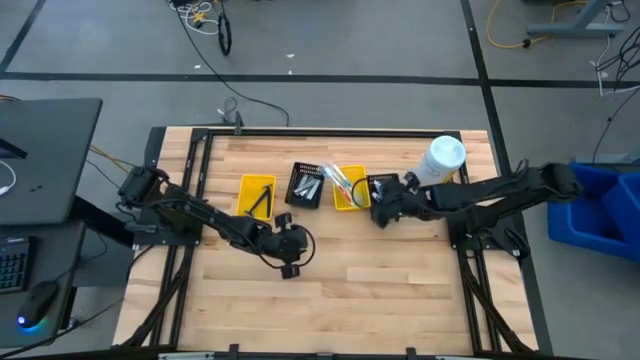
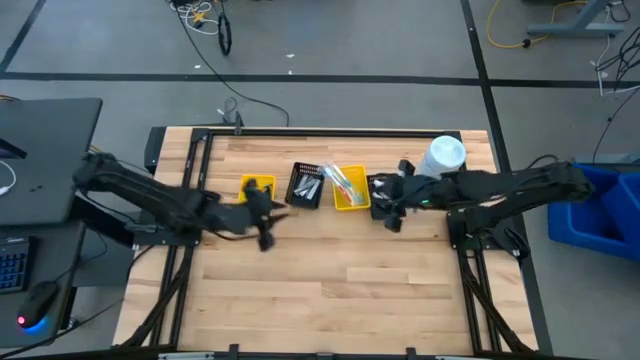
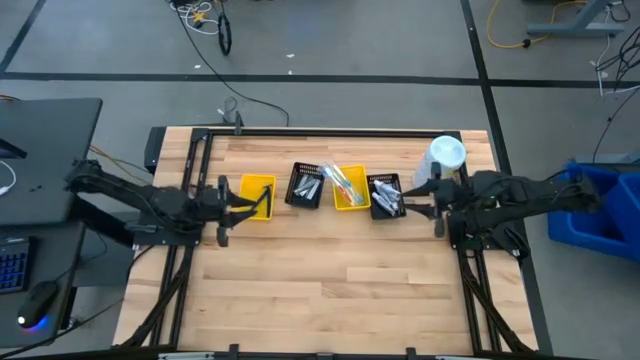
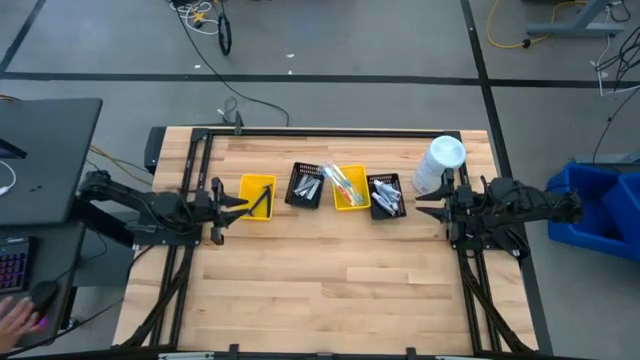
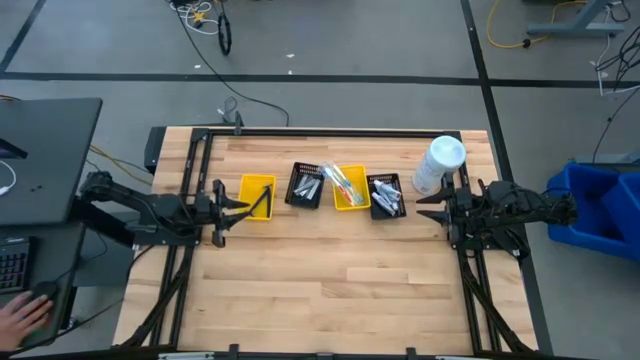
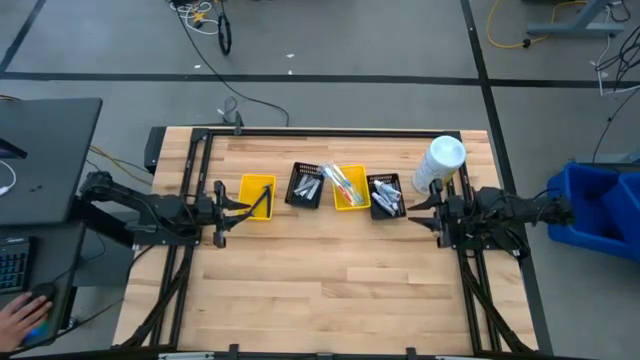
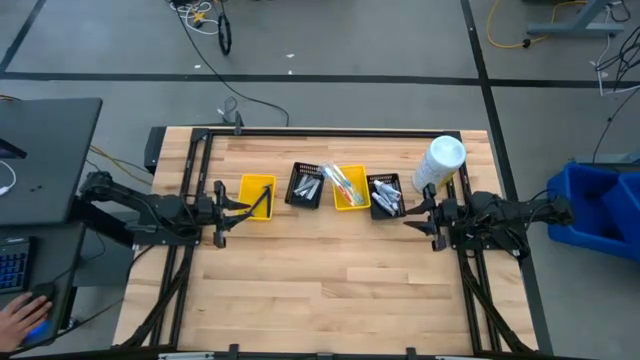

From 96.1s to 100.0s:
Task: Pick & Place Travel size toiletries
Return to Home Position

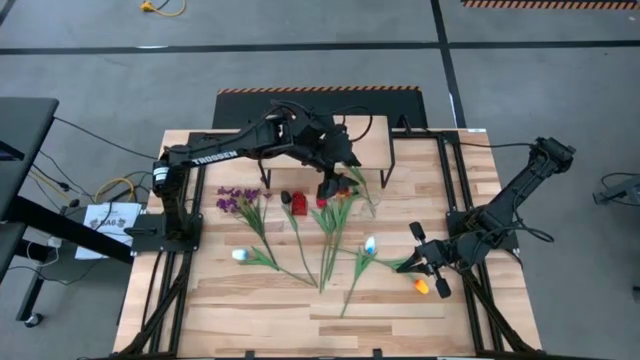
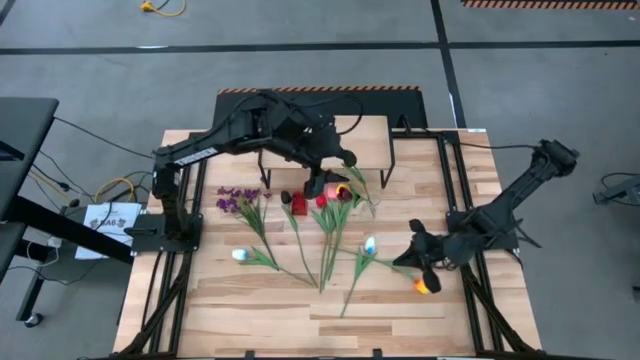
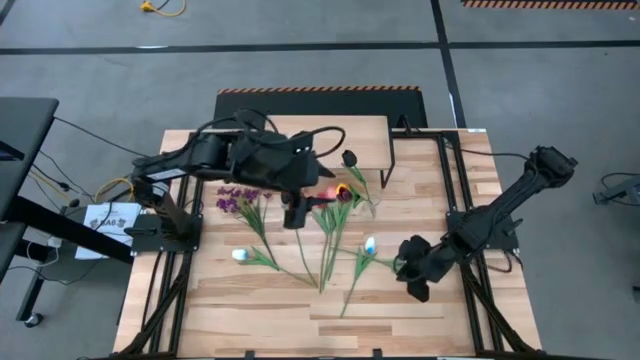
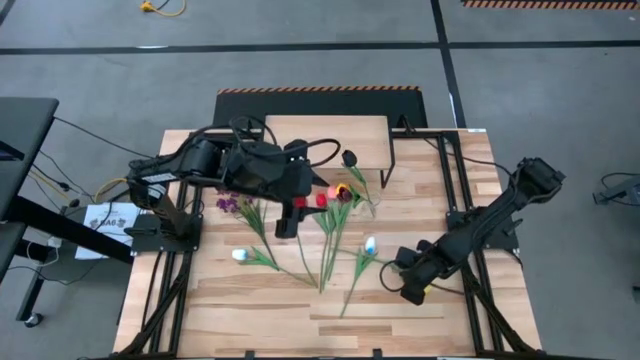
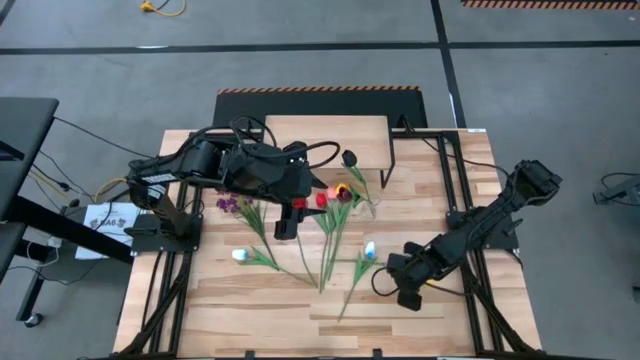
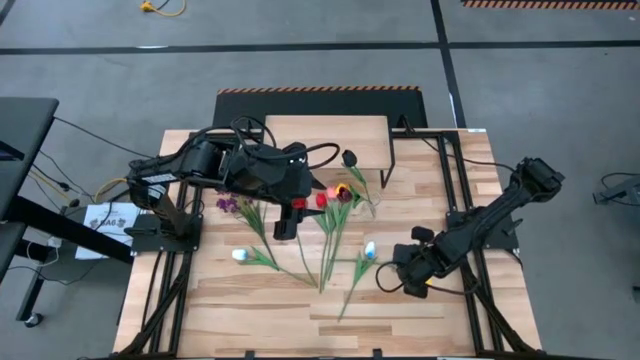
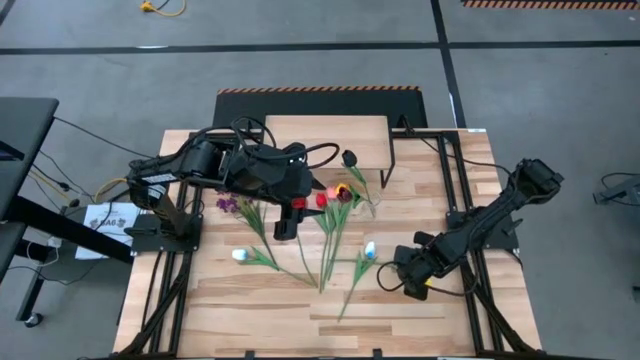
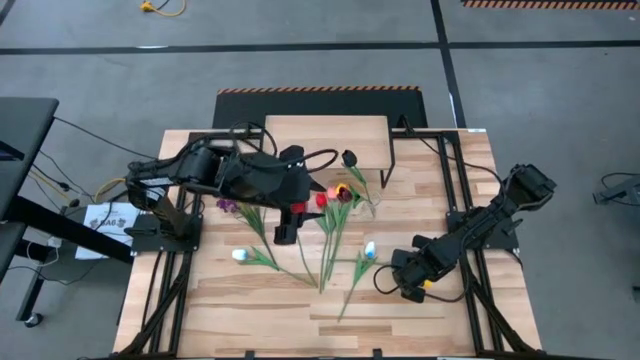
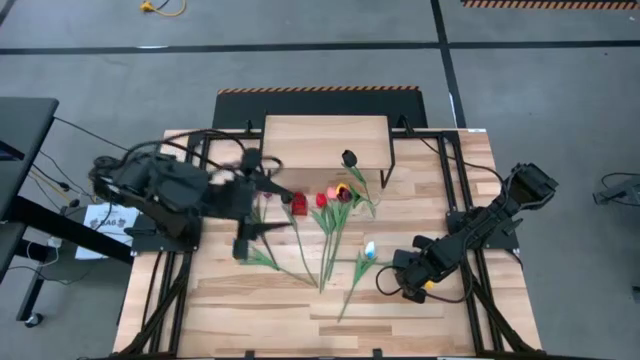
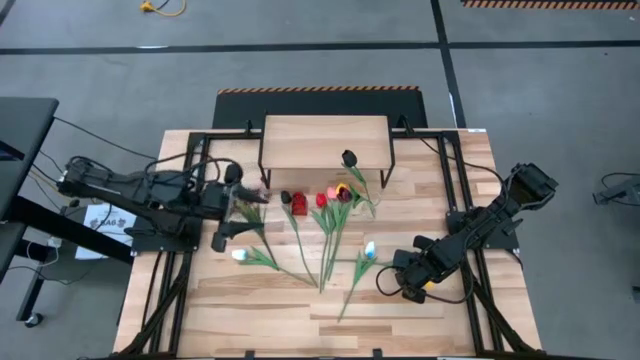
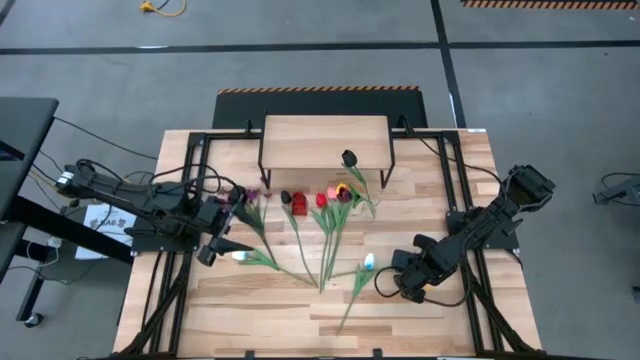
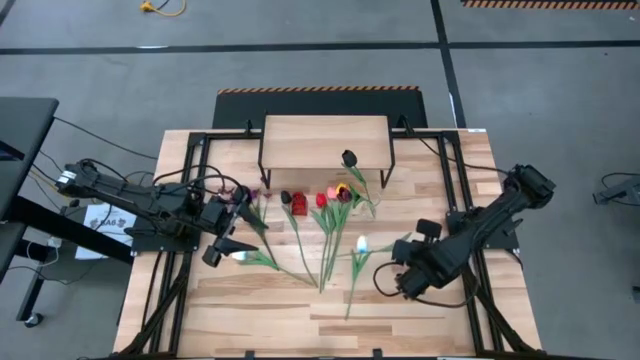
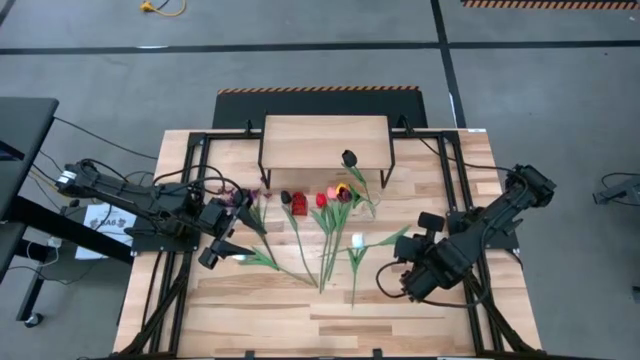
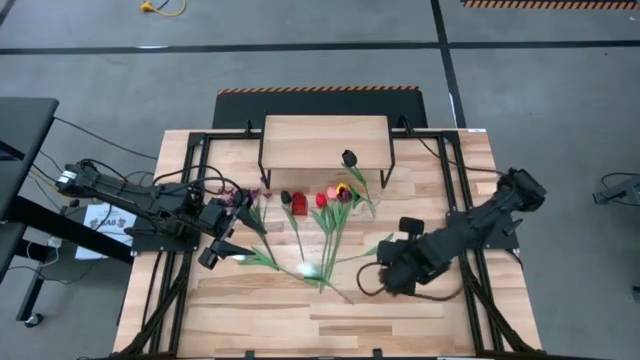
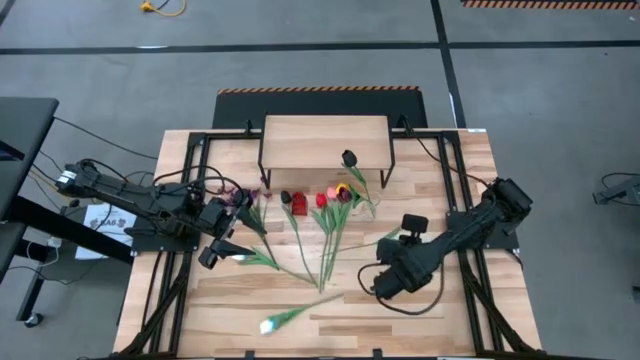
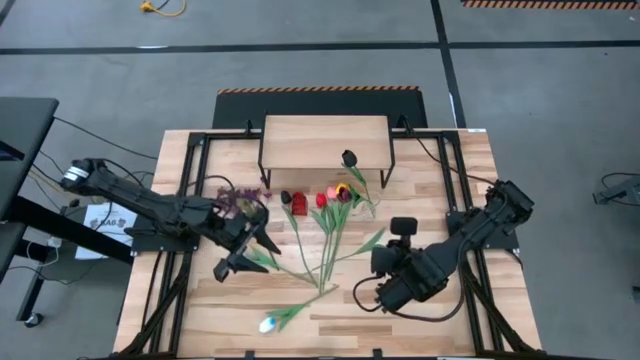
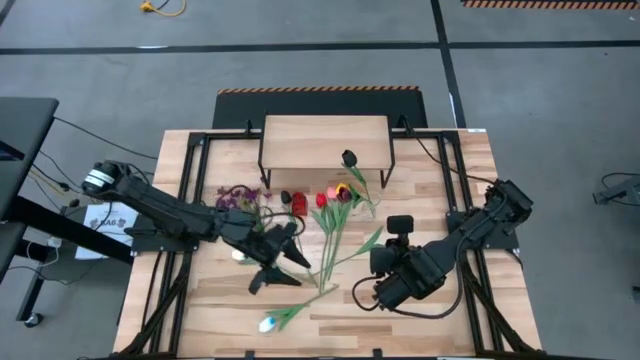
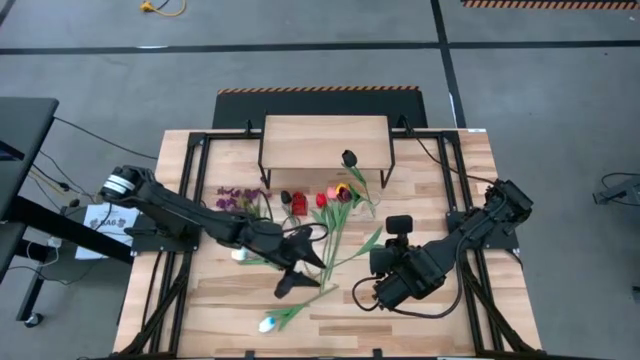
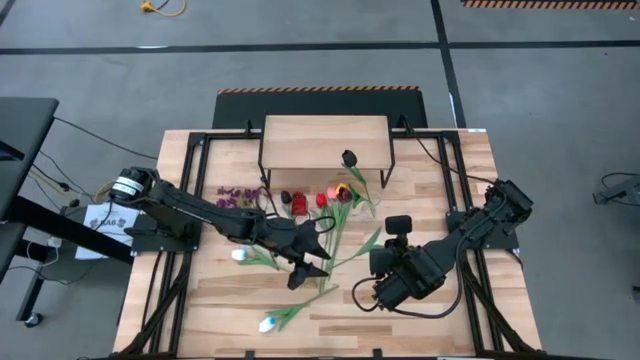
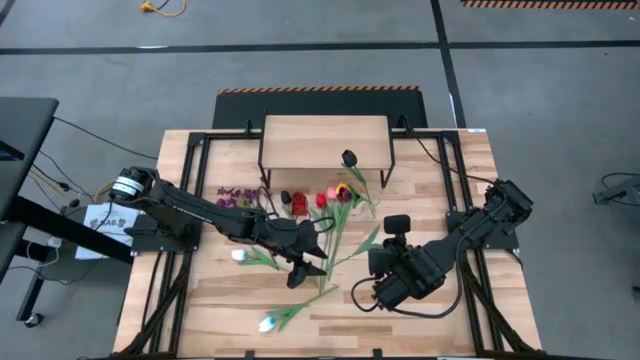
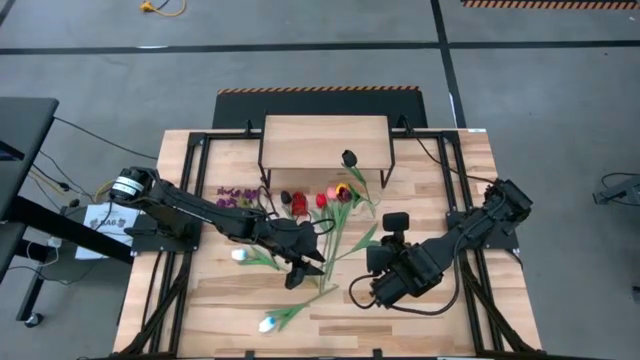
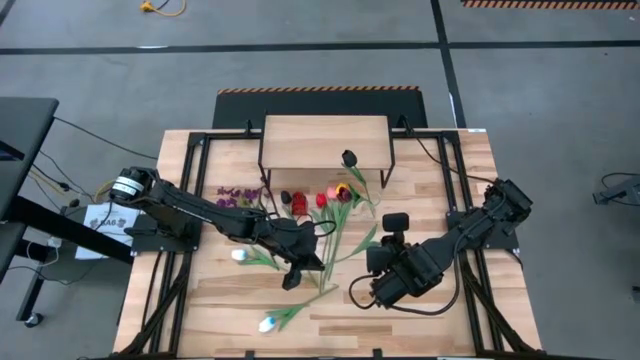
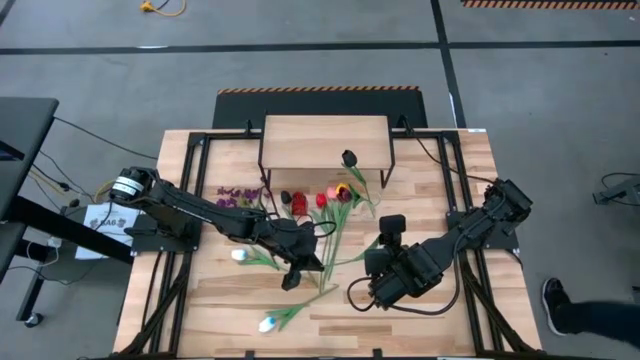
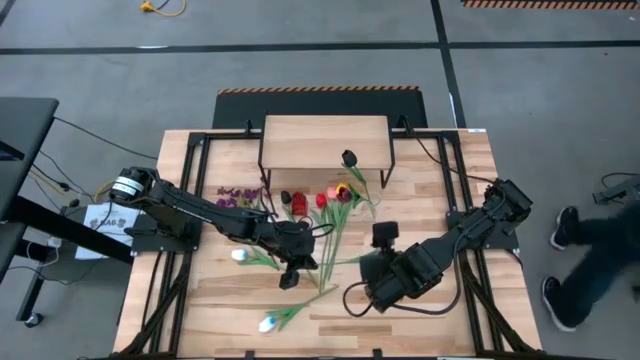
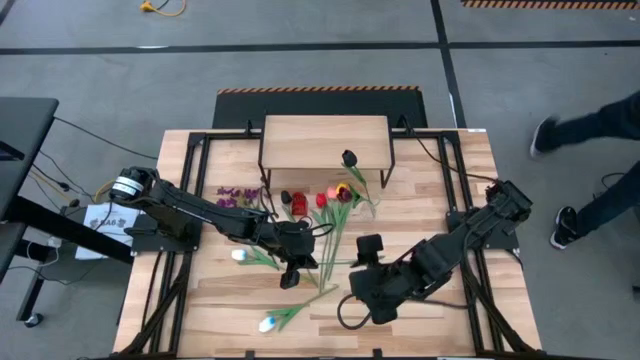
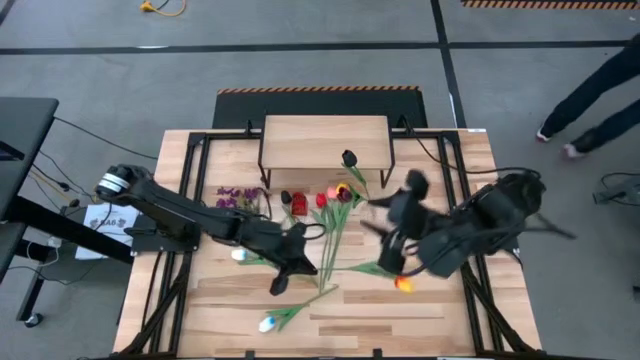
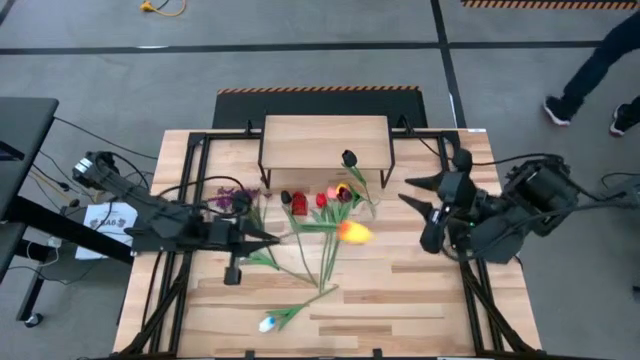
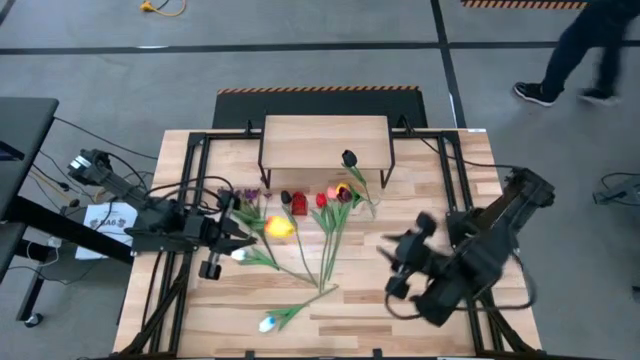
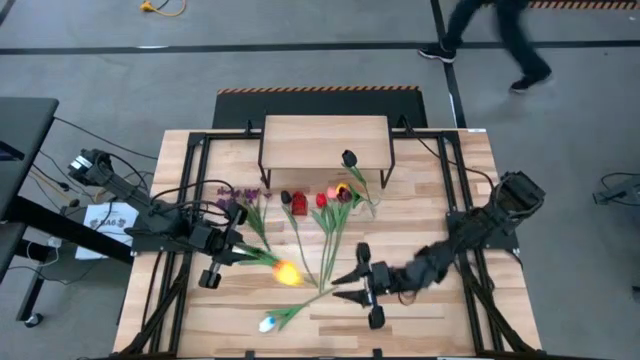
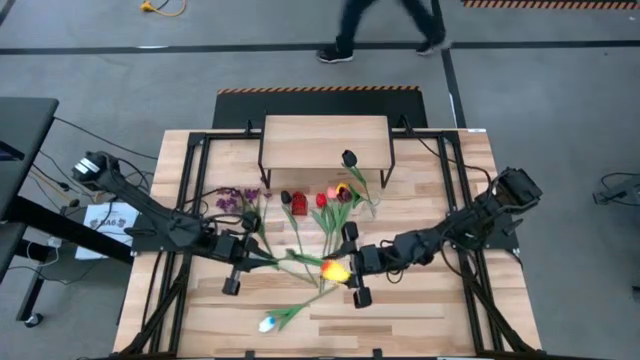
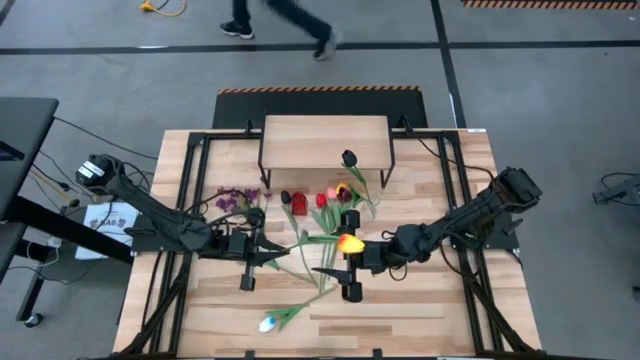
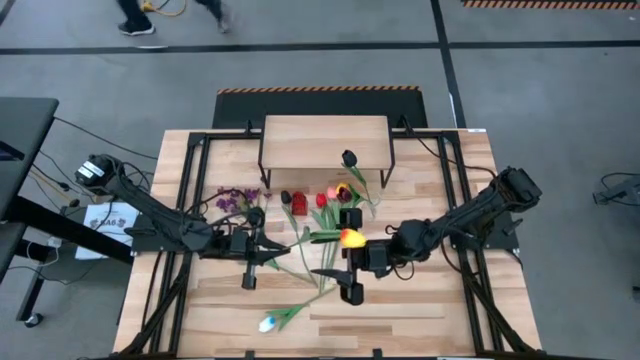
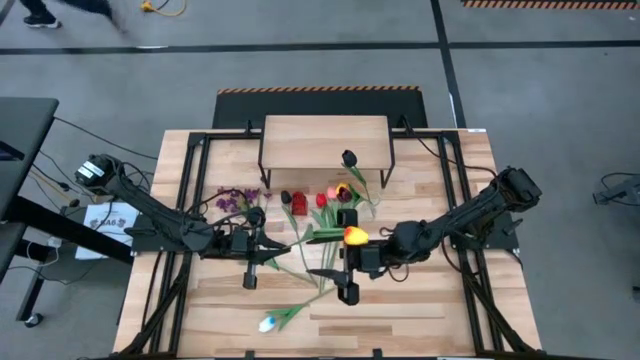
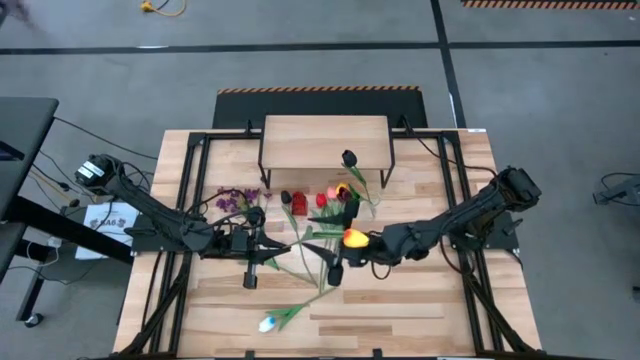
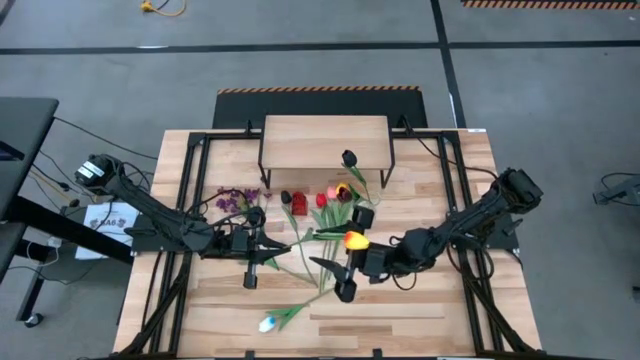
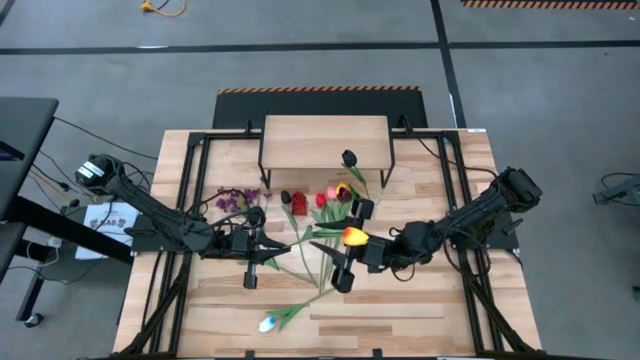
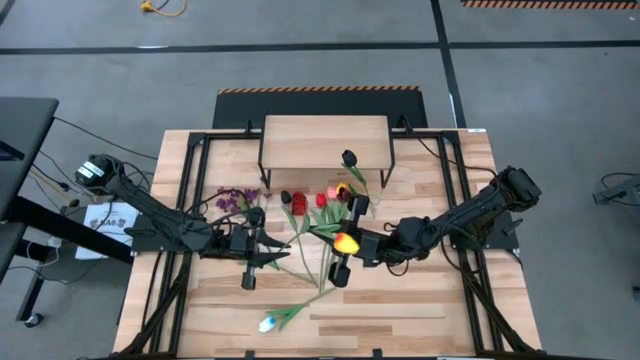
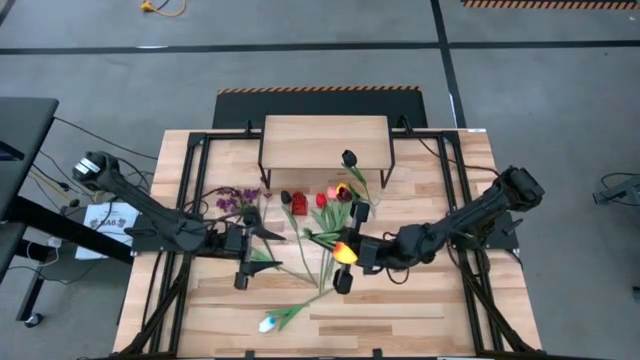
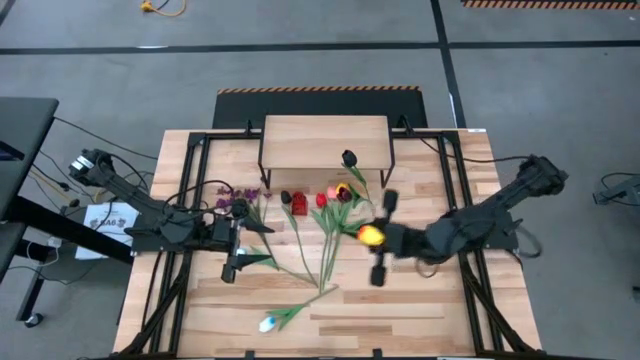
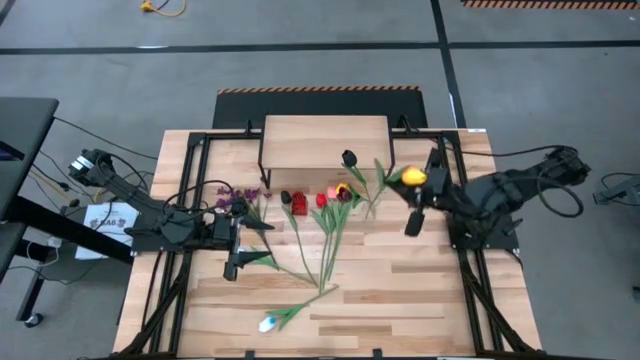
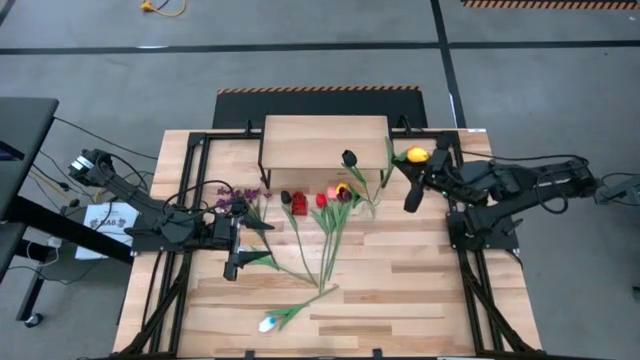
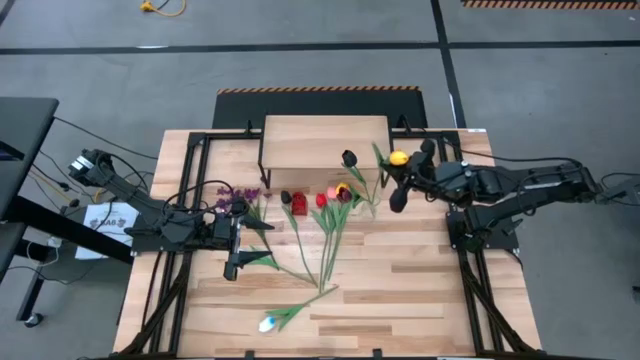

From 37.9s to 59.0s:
Task: Pick and place flowers into a vace then onto a shelf
Put the bottom yellow flower into the transparent vase
